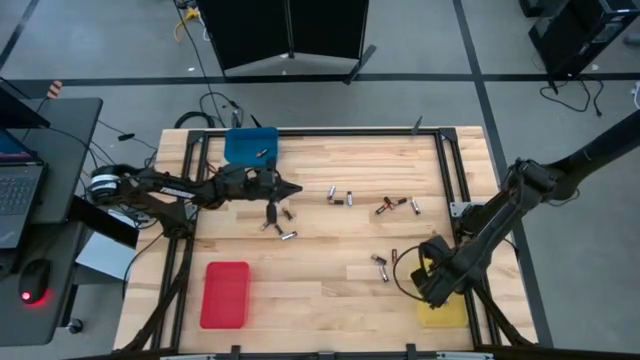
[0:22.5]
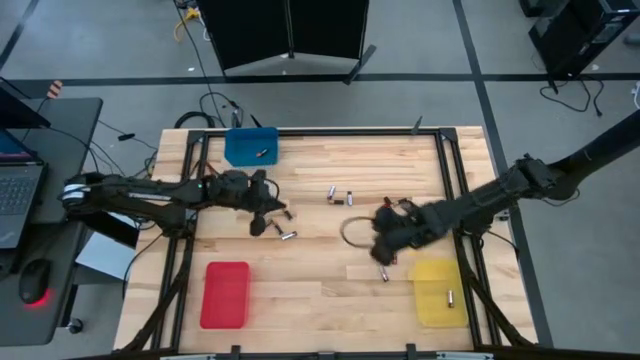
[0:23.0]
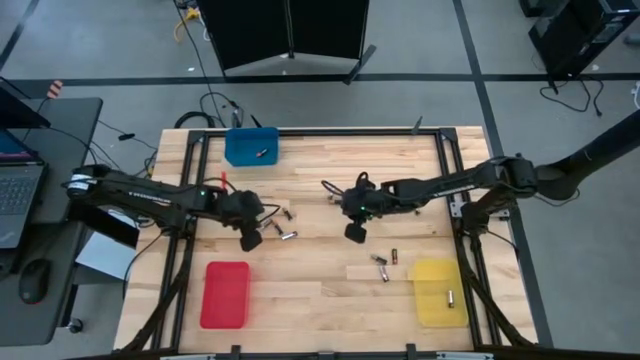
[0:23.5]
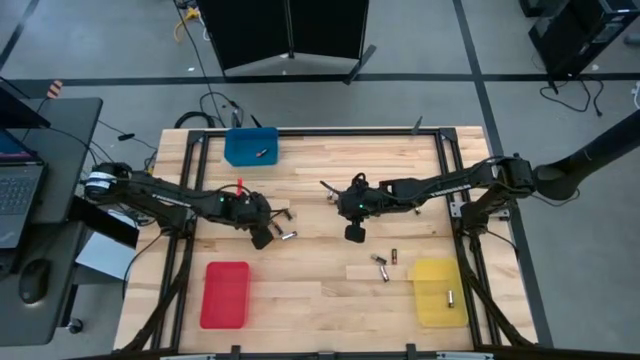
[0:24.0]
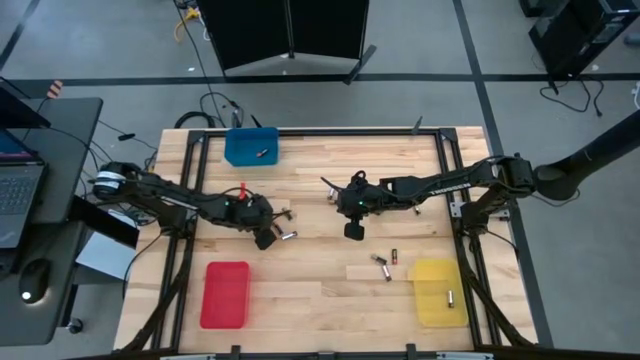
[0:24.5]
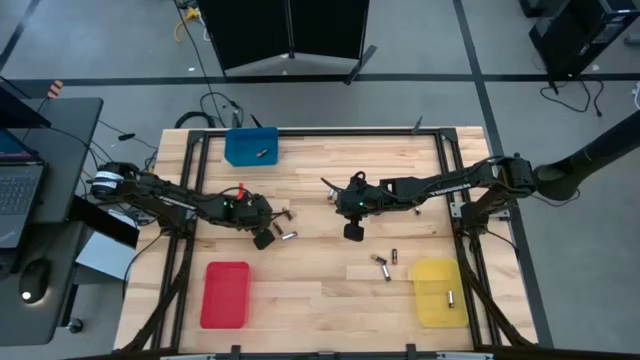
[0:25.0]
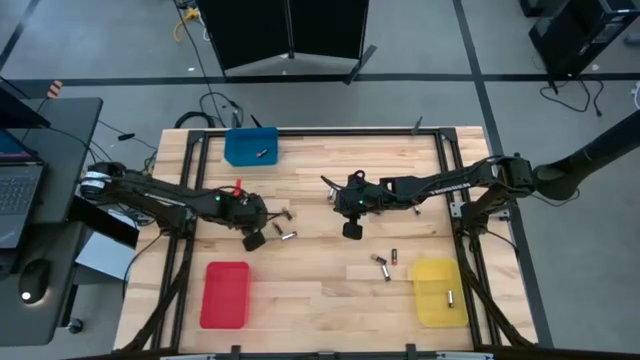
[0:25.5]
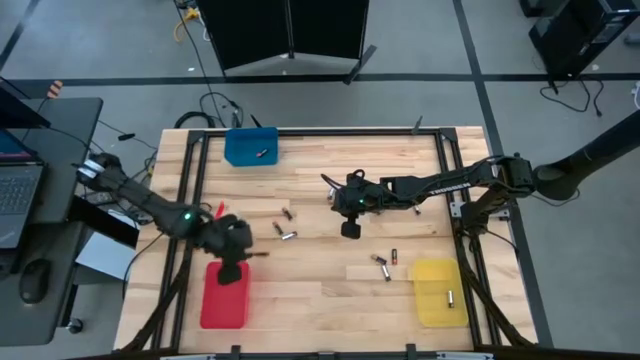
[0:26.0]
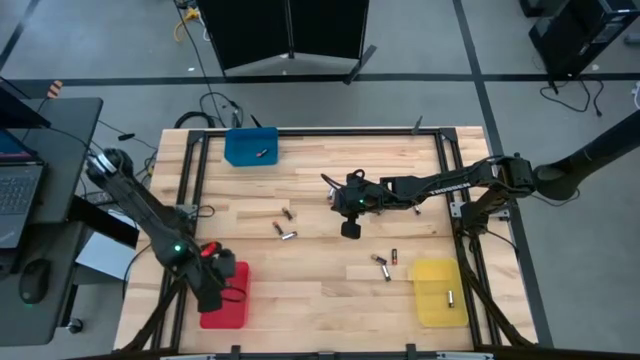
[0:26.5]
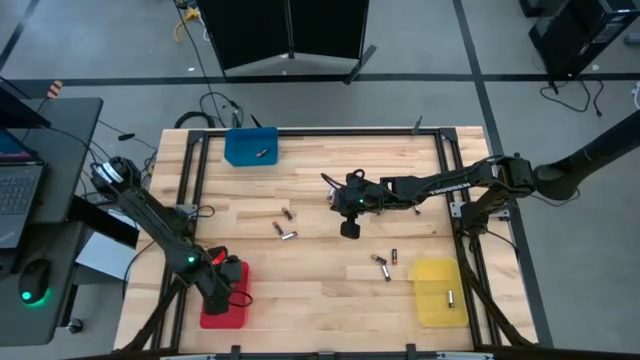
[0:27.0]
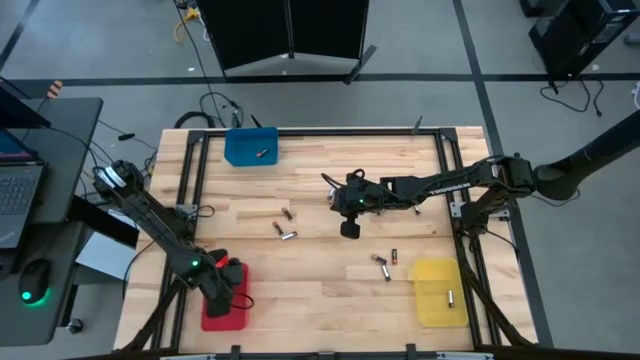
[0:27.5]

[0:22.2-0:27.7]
Task: Sort batteries
Put the brown battery into the red bin

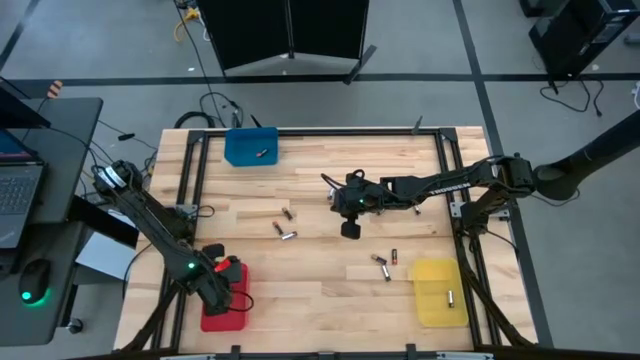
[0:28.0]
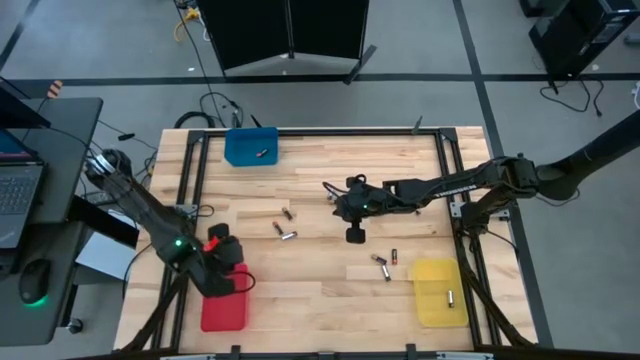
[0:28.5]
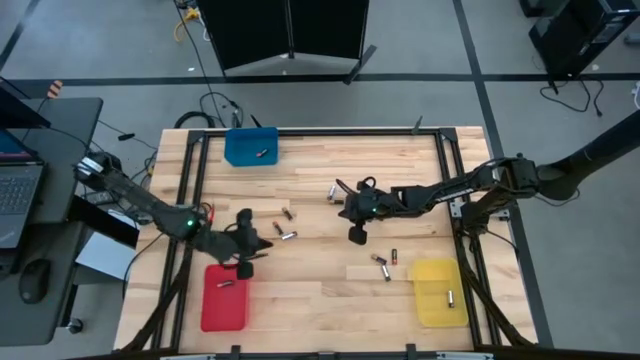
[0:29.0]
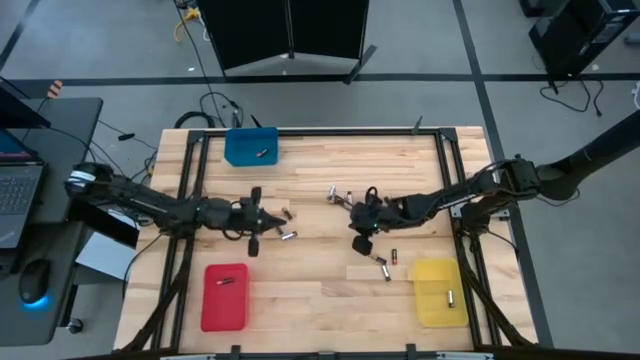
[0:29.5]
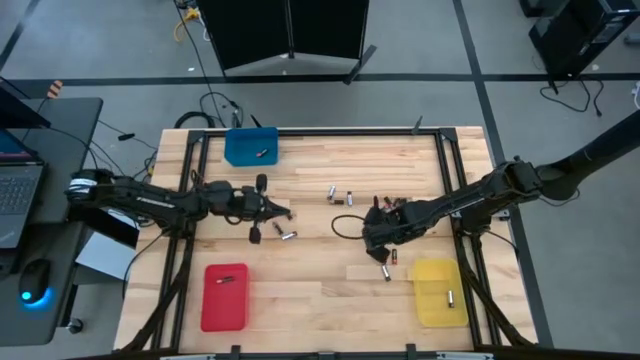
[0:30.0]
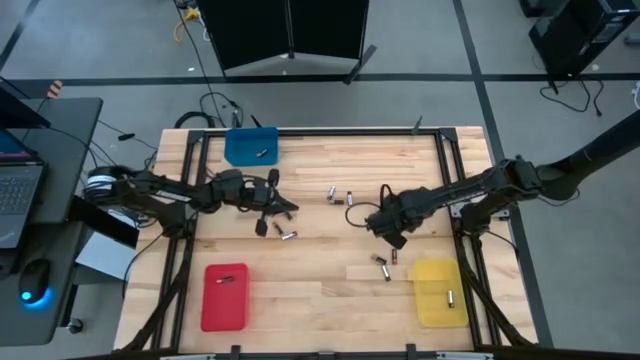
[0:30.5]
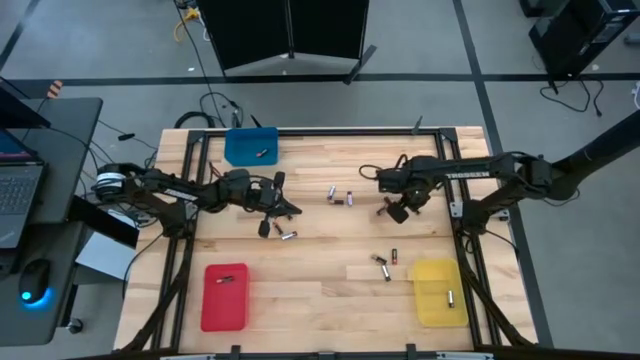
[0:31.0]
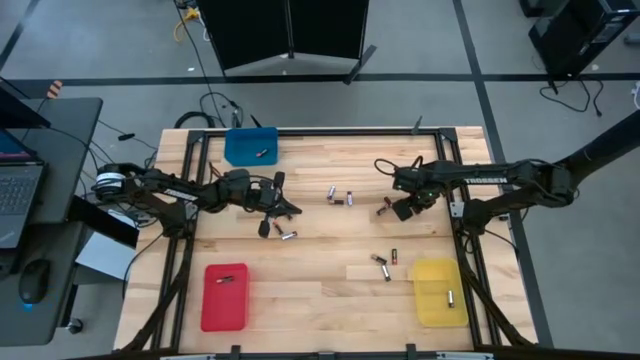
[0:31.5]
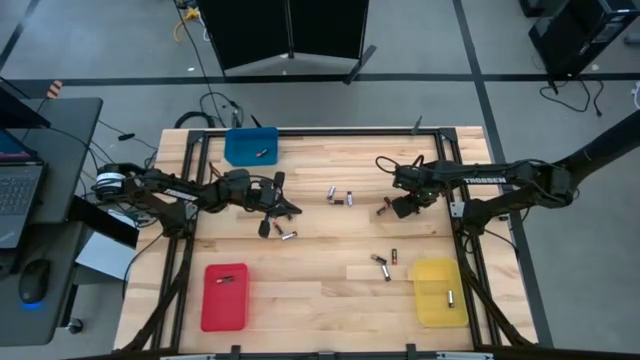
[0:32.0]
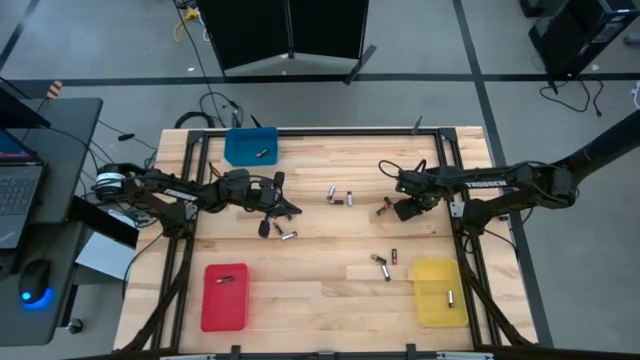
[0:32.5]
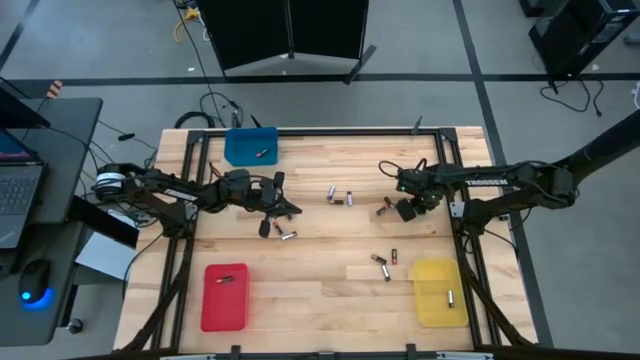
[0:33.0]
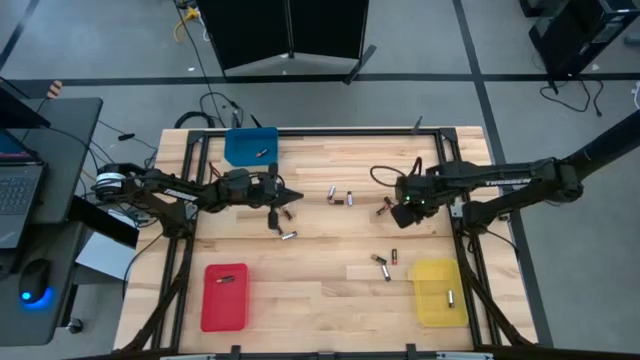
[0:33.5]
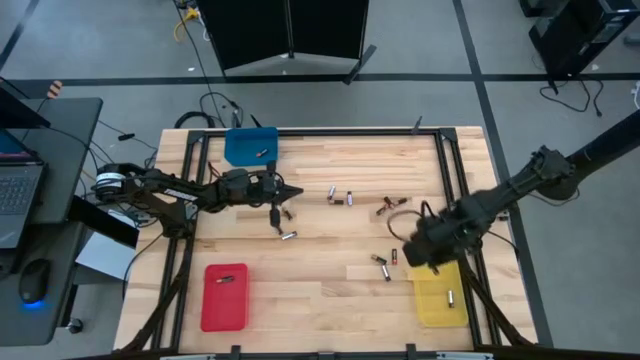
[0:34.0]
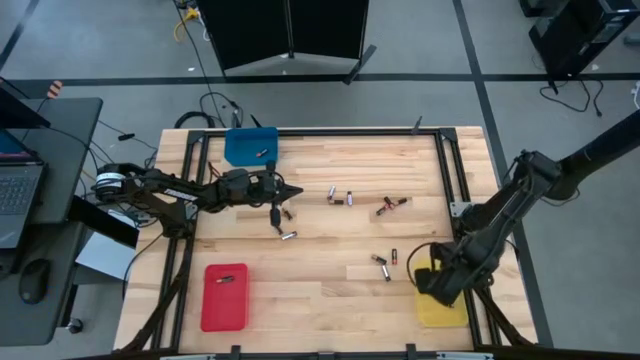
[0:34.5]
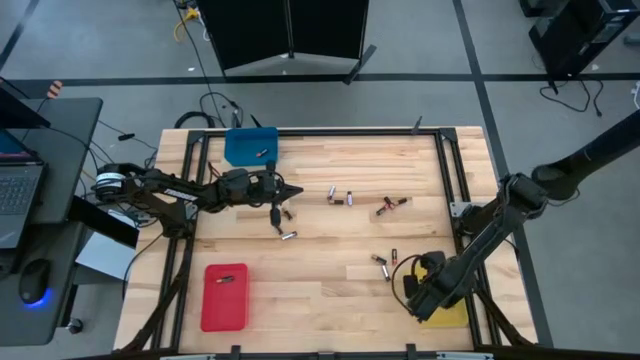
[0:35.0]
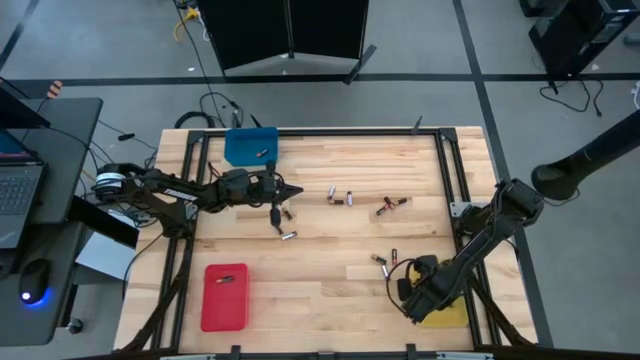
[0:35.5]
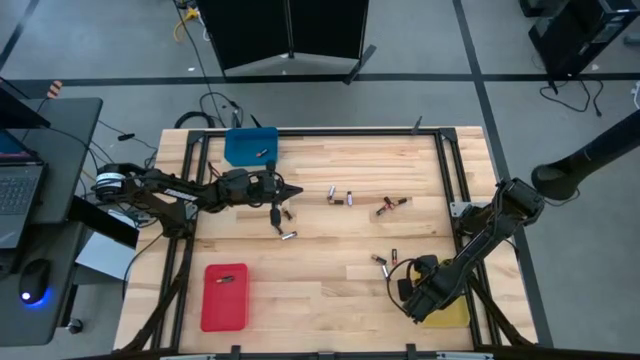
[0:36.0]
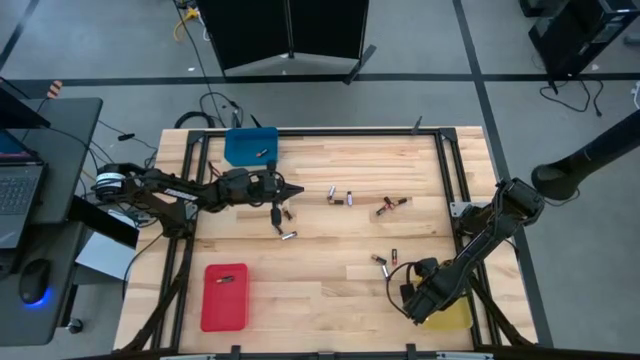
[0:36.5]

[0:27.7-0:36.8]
Put the silver battery into the yellow bin

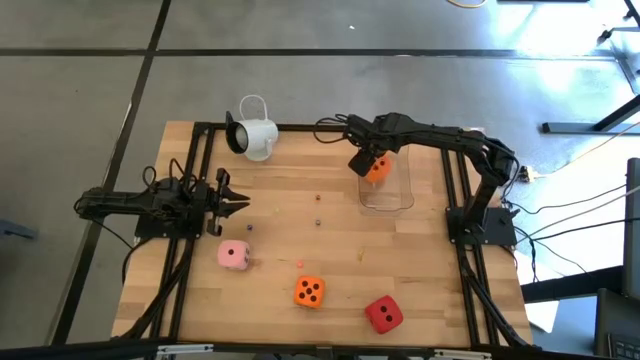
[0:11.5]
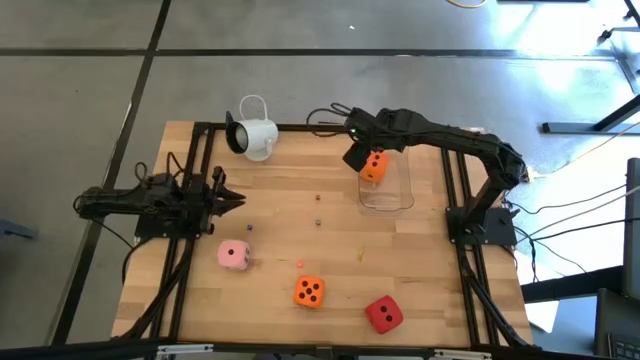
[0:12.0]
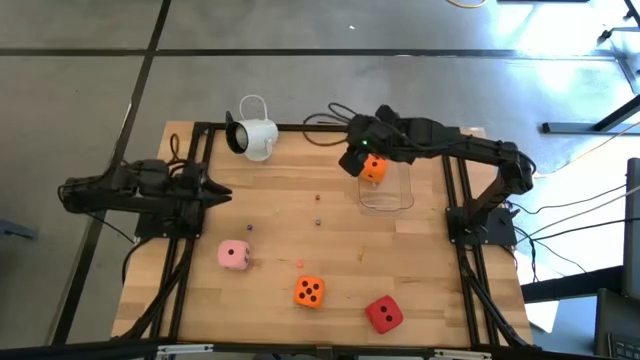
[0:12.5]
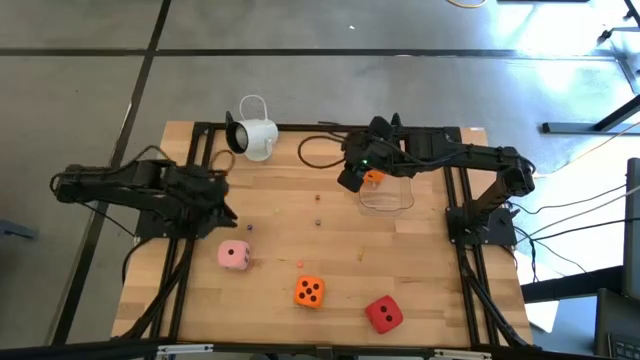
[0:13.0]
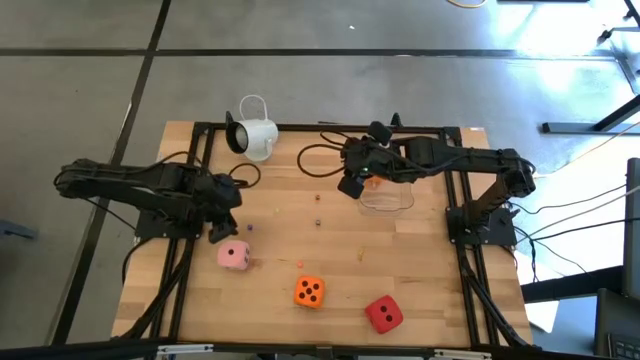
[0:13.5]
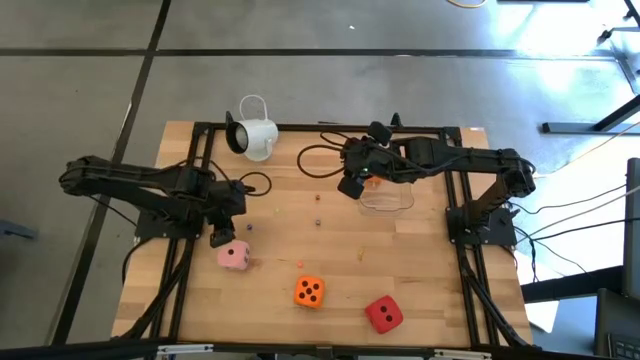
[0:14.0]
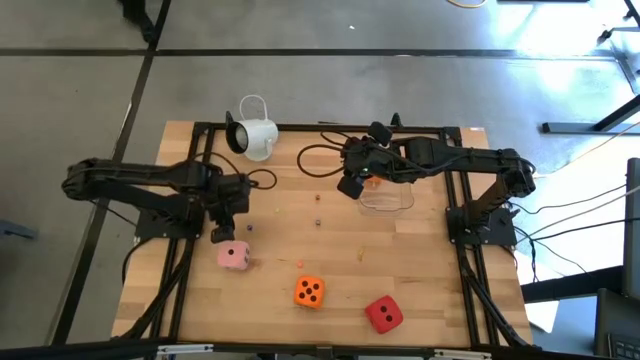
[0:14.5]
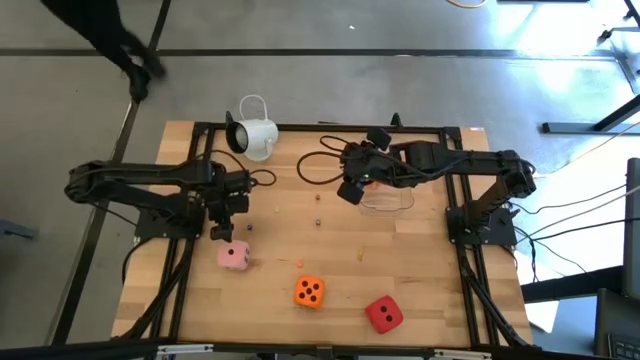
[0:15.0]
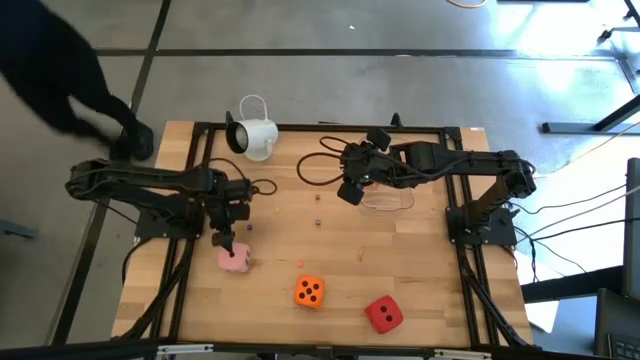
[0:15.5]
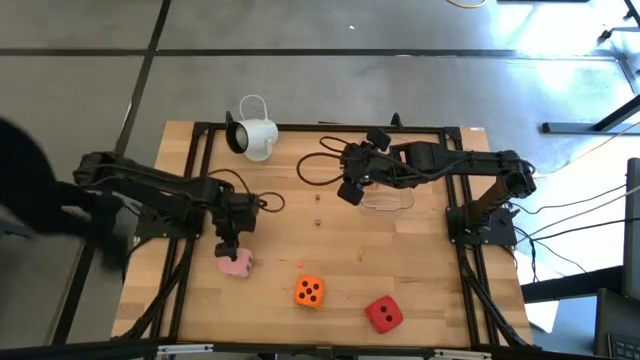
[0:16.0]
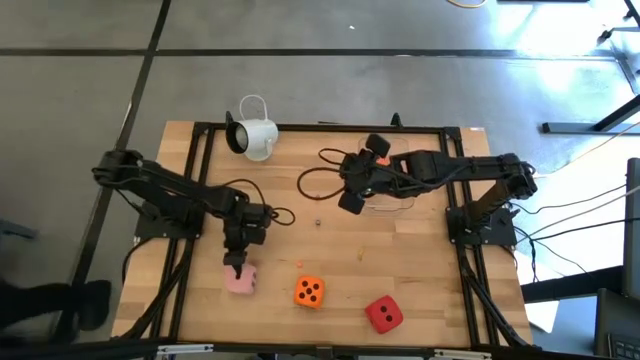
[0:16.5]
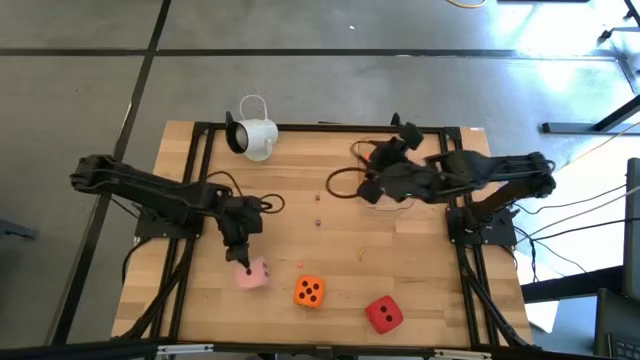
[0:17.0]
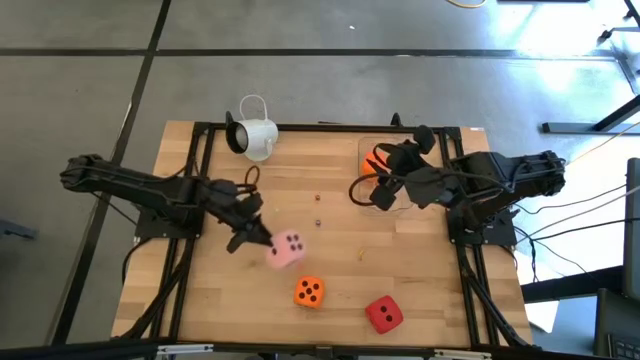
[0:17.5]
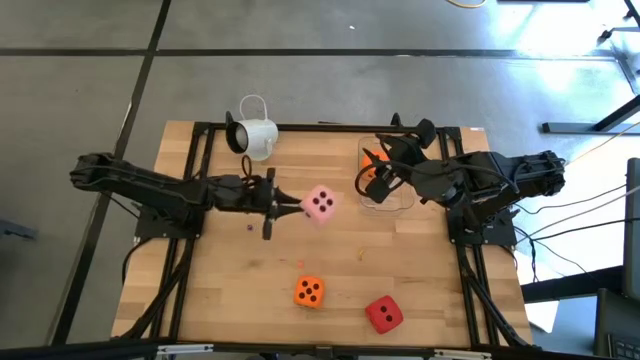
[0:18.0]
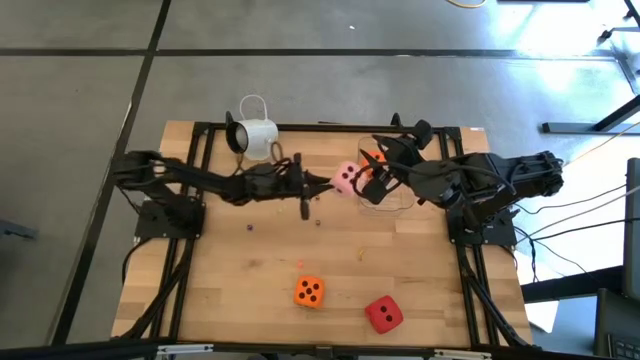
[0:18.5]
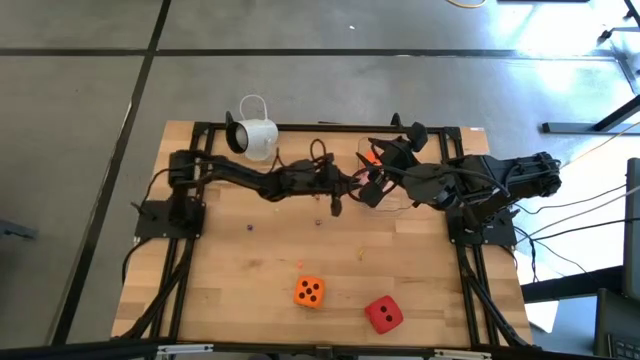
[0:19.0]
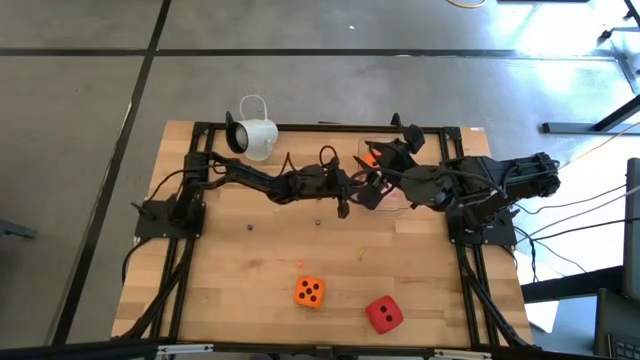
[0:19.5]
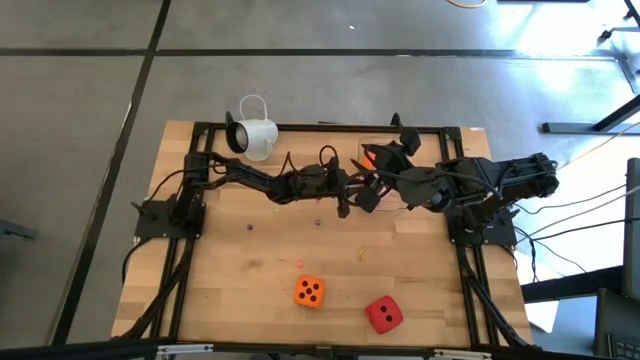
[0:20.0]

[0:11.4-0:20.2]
Task: Pick & Place Dice
Put the large pink die into the transparent bin
